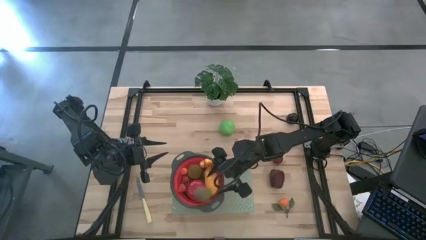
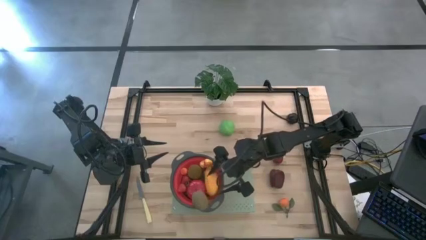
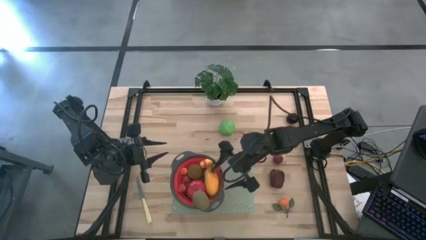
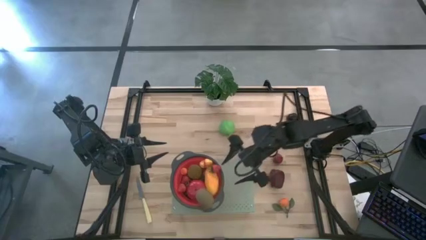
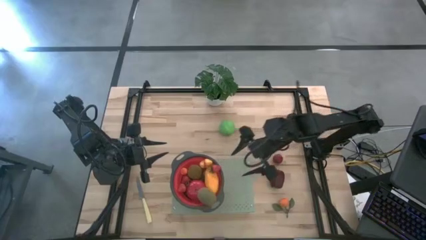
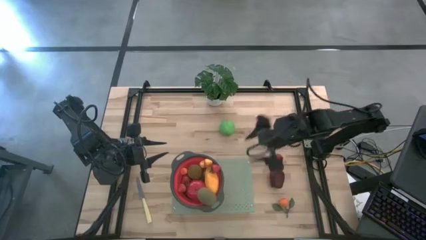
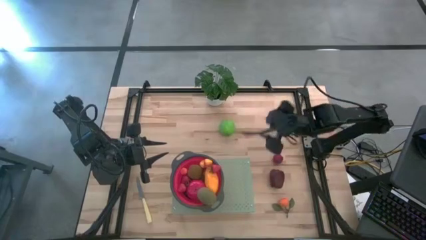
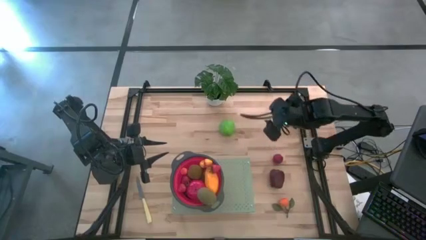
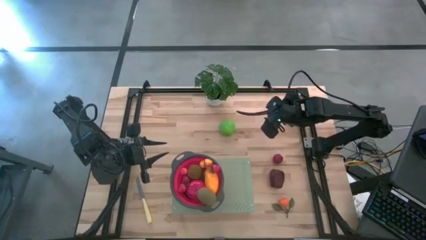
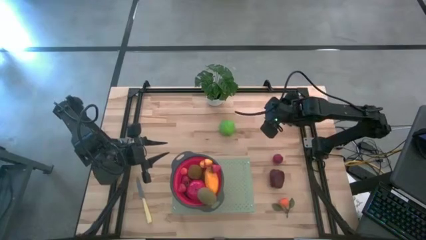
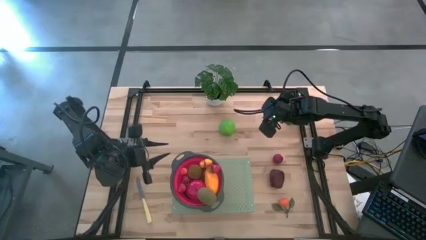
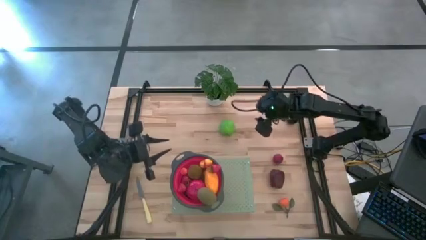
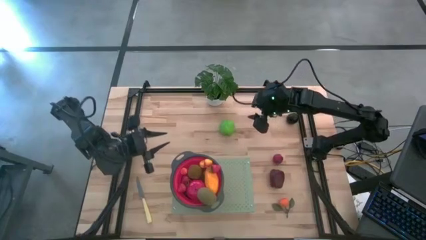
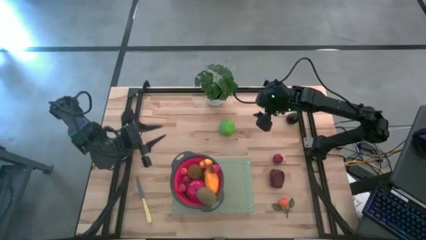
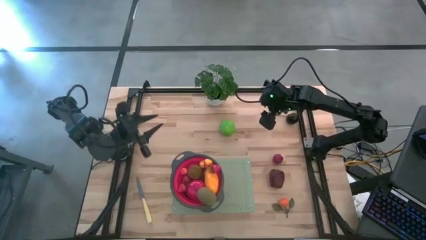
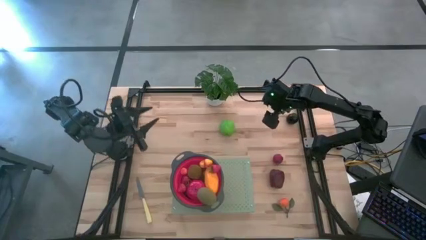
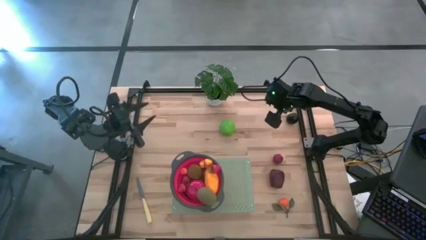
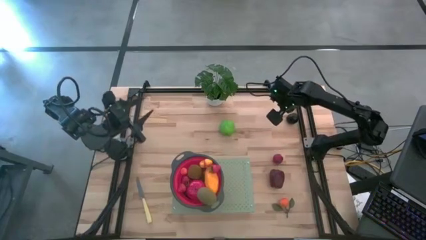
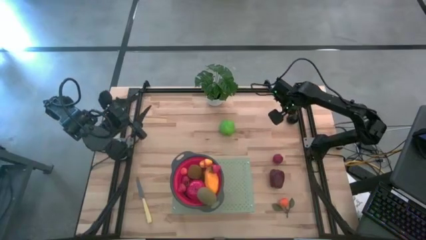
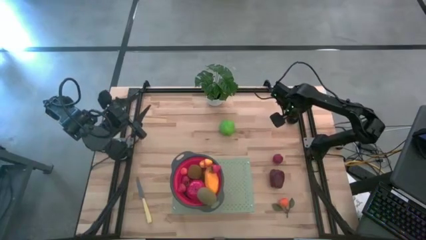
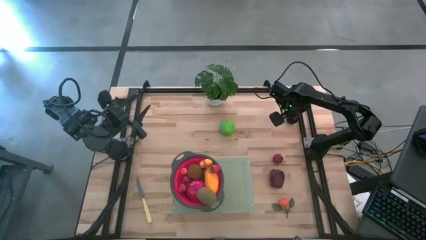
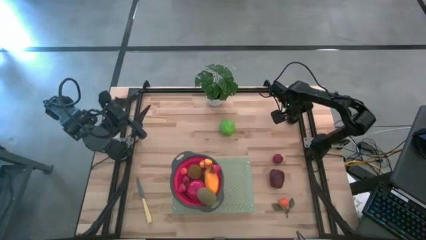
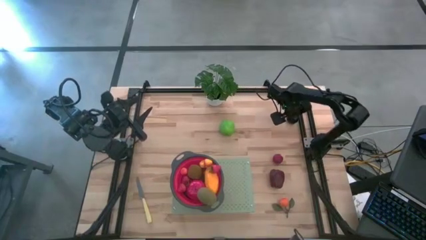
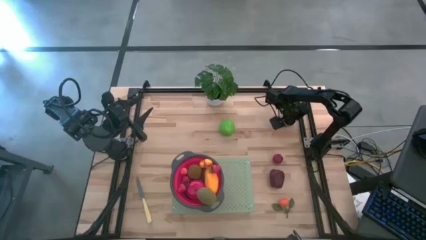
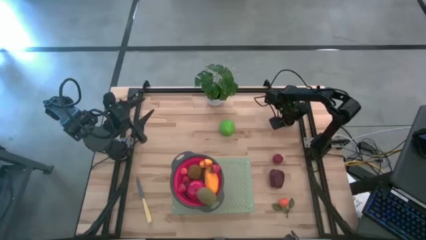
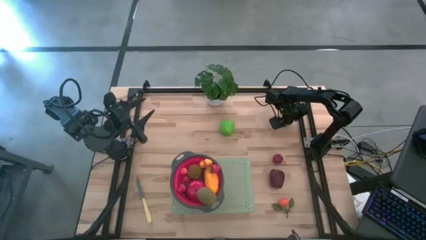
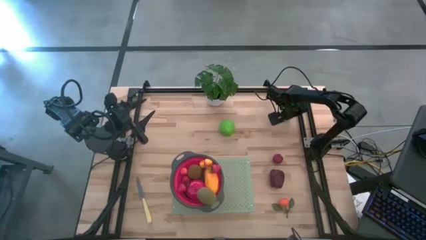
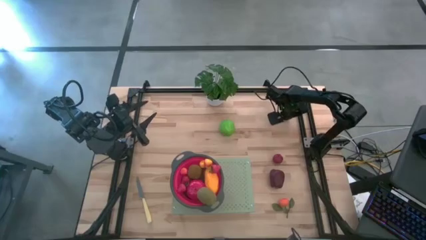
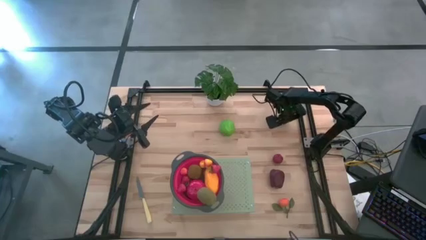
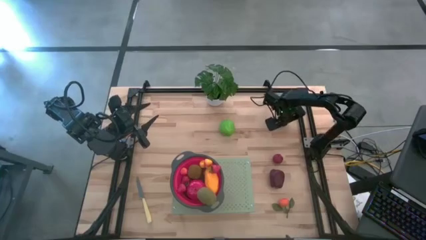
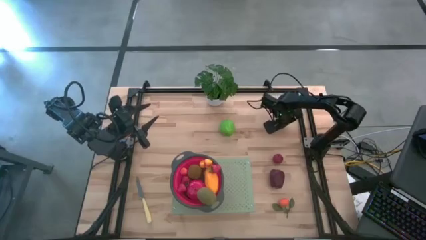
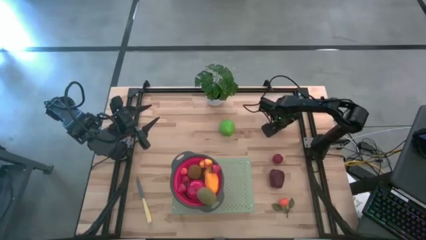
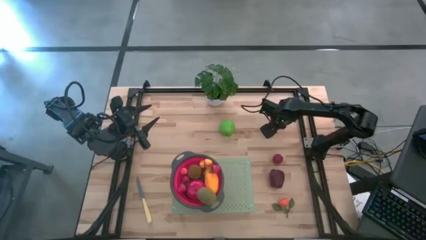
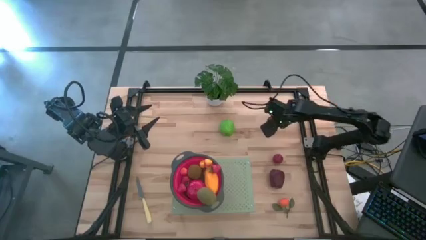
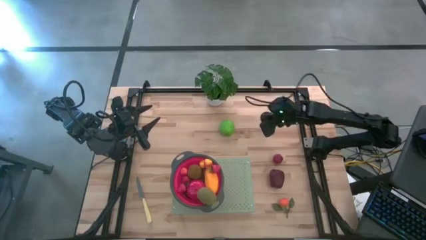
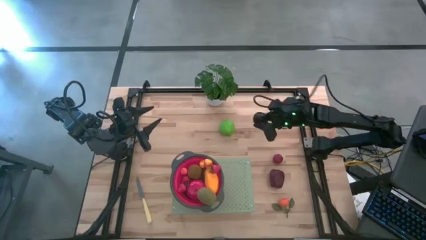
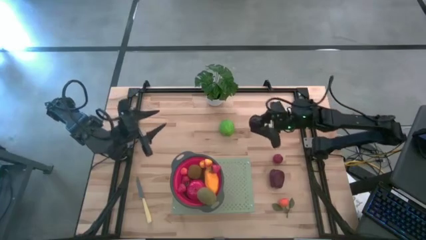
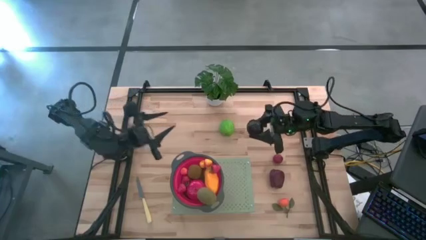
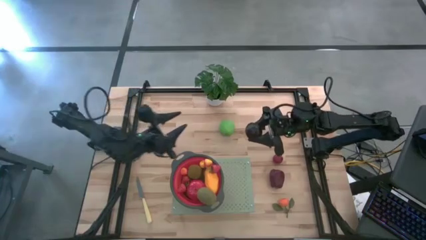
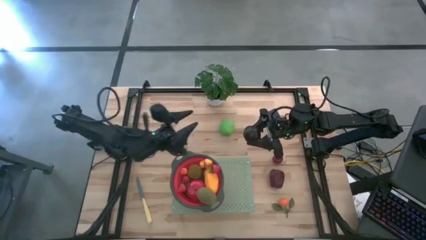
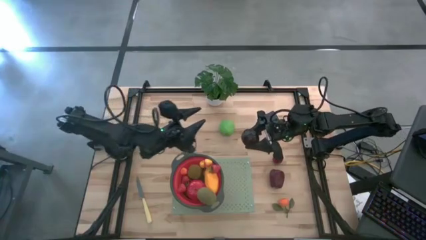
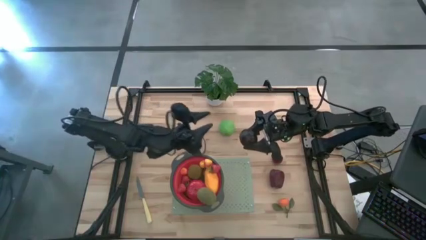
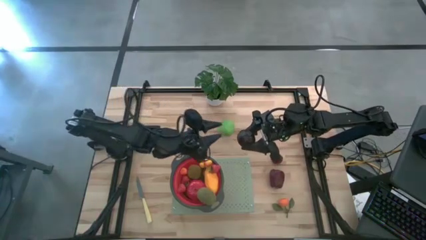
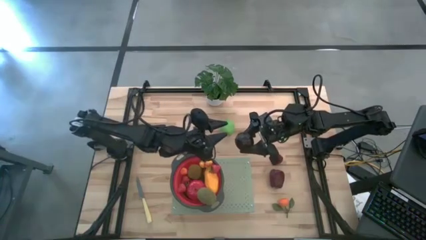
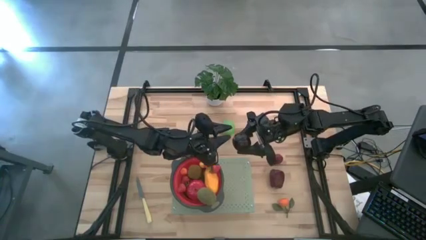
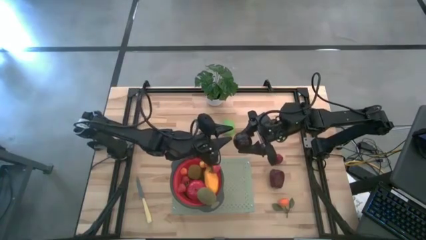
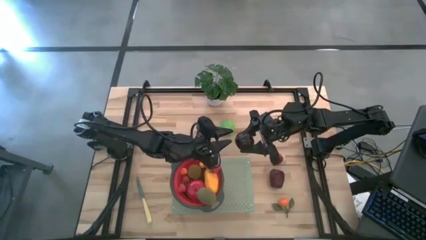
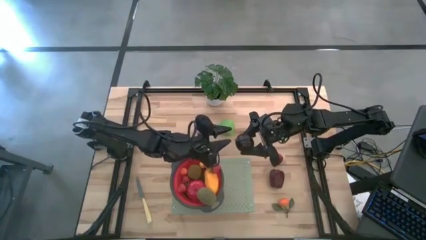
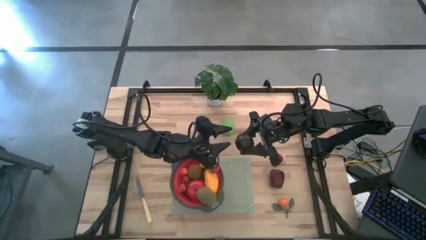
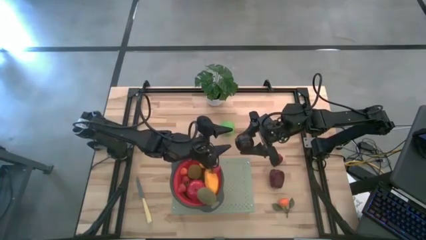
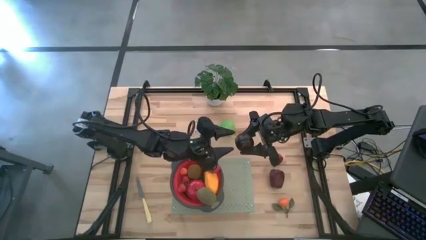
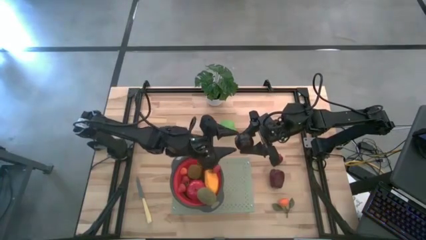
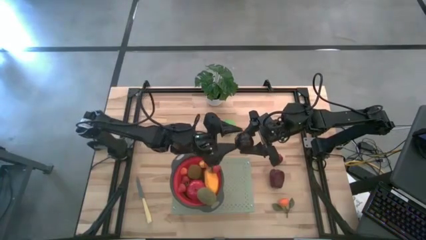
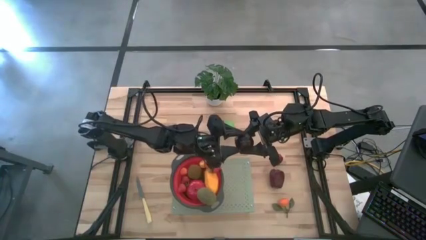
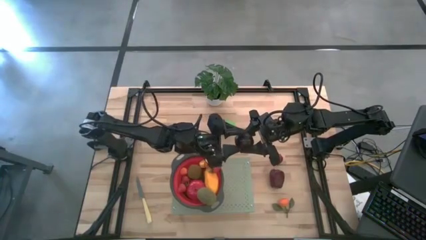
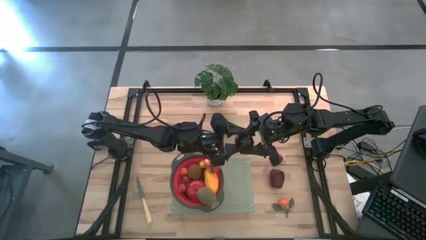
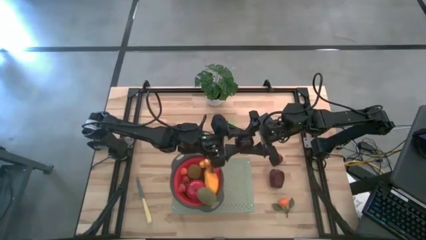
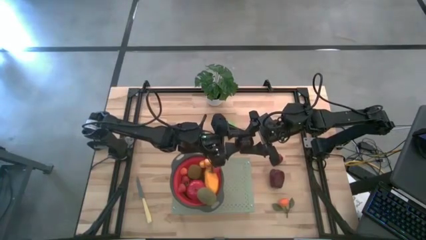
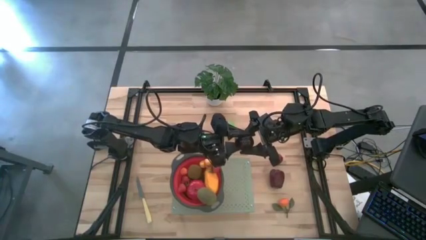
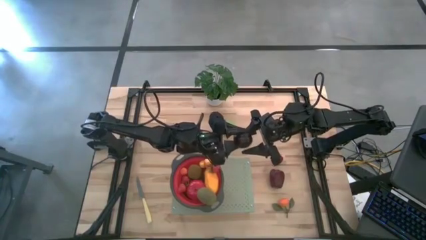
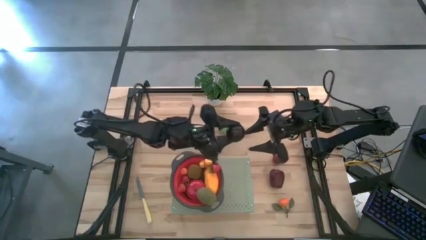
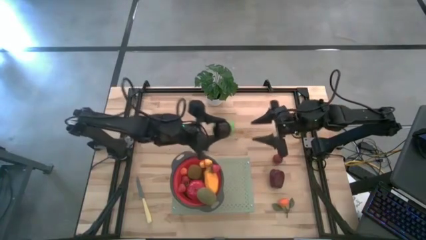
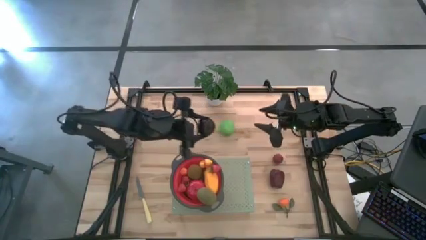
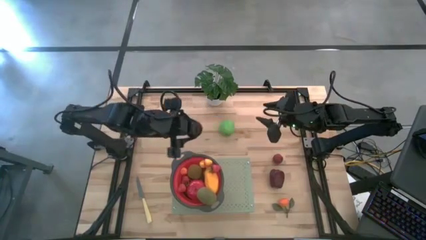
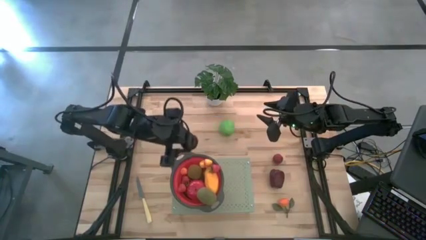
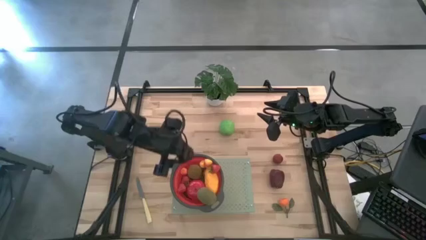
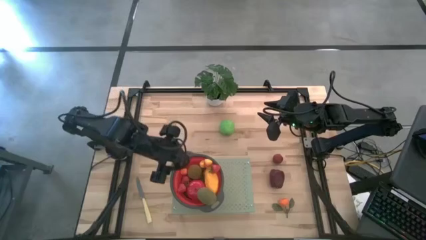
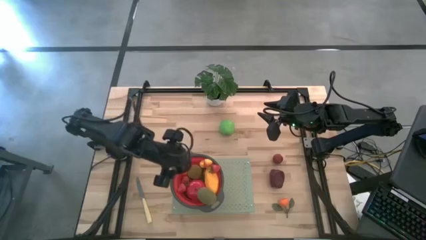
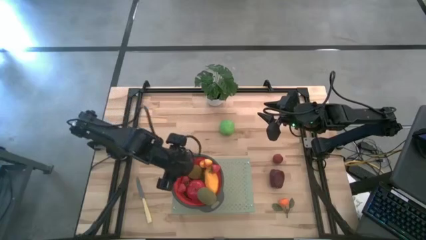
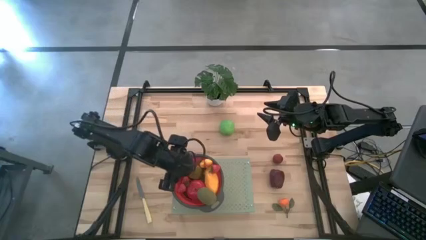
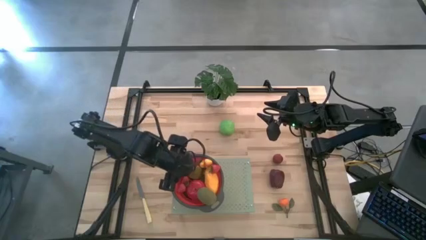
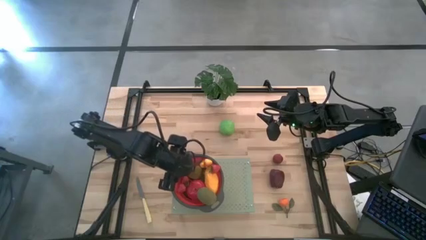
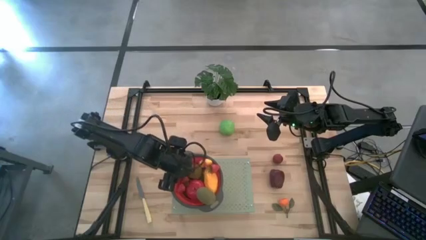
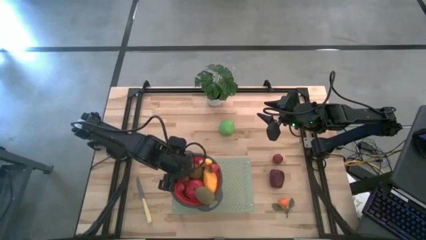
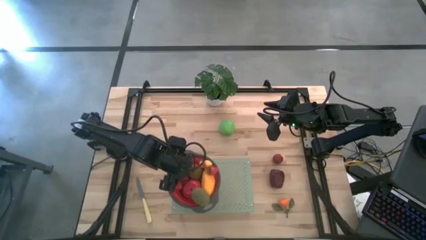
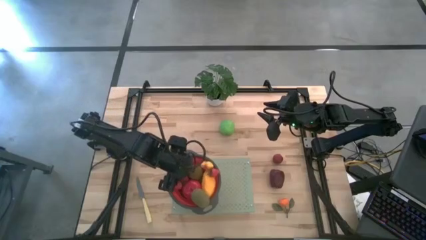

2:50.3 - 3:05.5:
Task: Pick & Place Fruit
Put the plum into the red strainer
